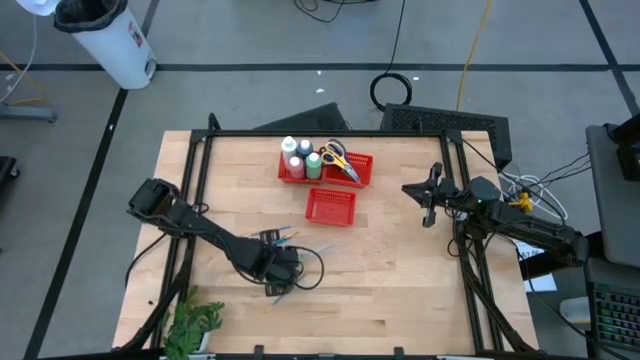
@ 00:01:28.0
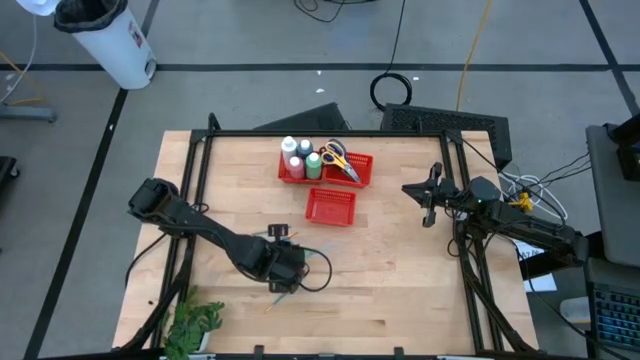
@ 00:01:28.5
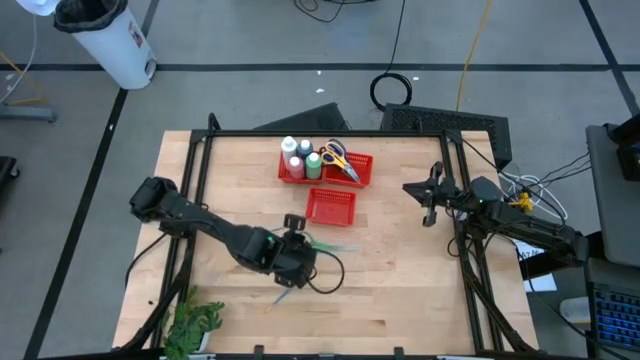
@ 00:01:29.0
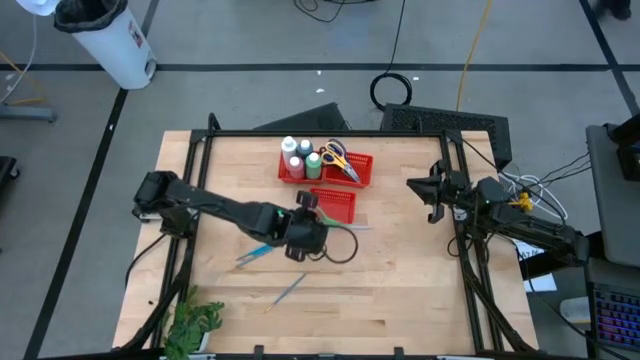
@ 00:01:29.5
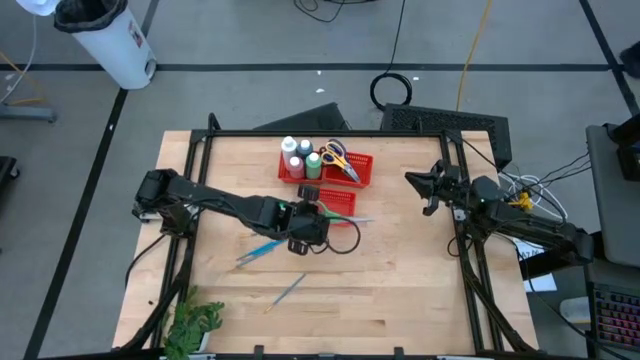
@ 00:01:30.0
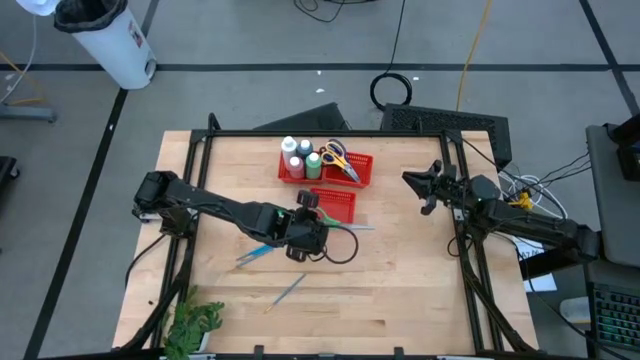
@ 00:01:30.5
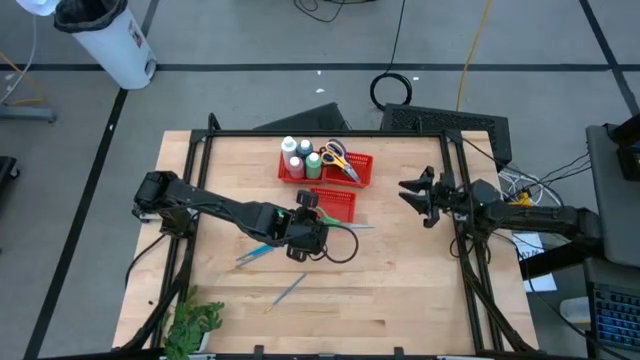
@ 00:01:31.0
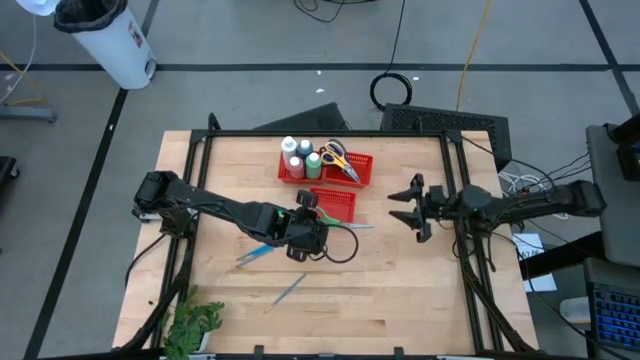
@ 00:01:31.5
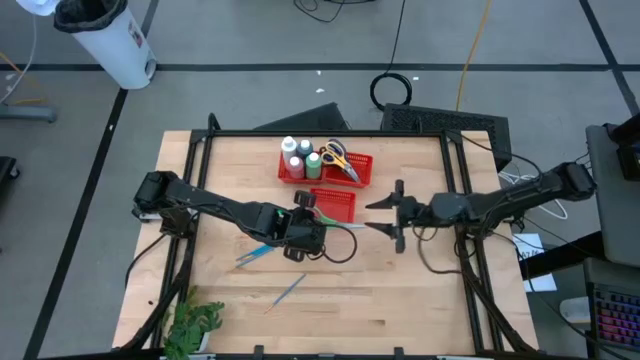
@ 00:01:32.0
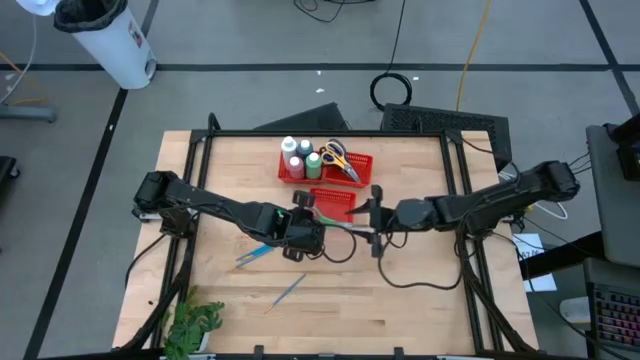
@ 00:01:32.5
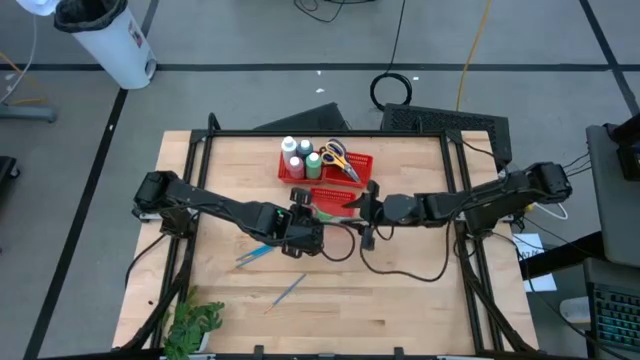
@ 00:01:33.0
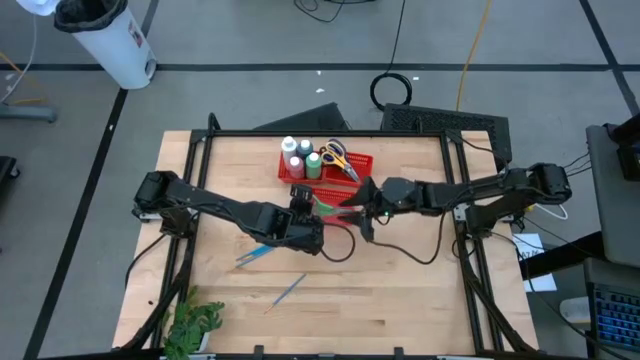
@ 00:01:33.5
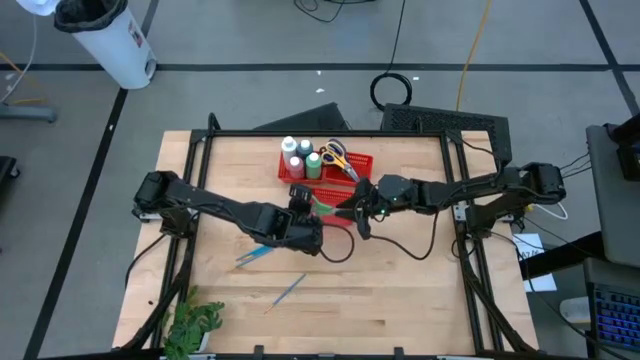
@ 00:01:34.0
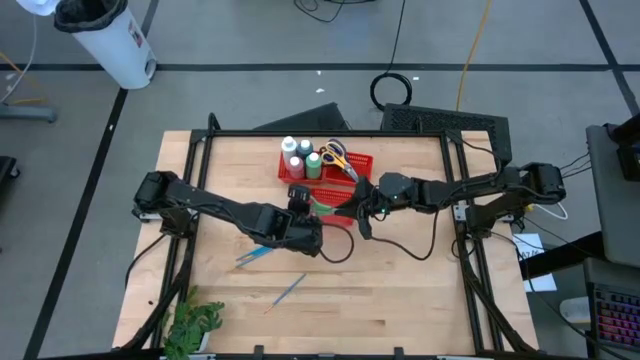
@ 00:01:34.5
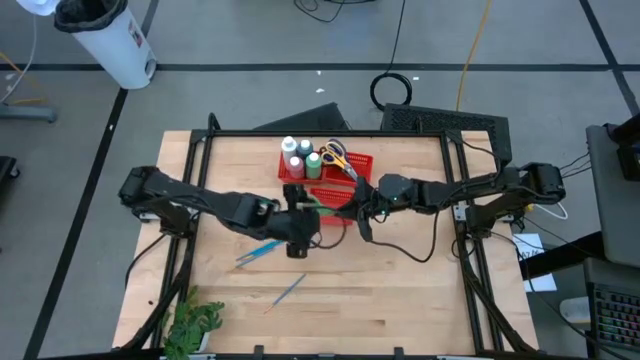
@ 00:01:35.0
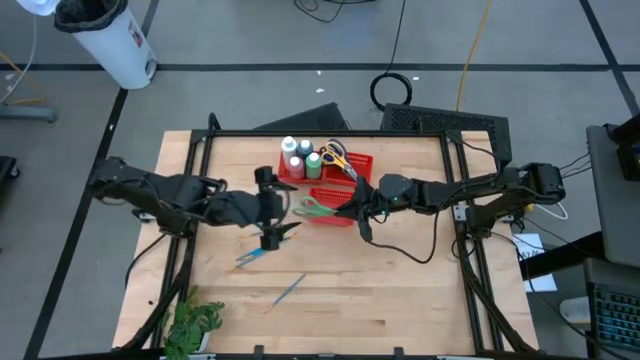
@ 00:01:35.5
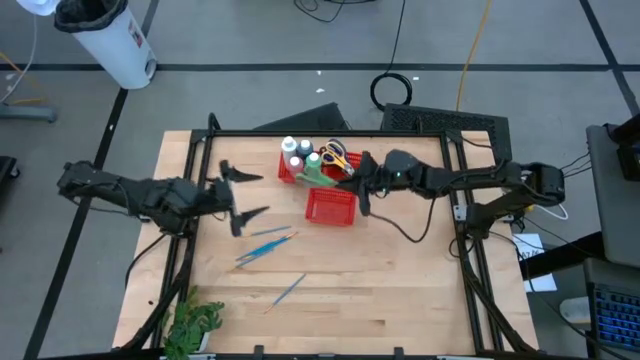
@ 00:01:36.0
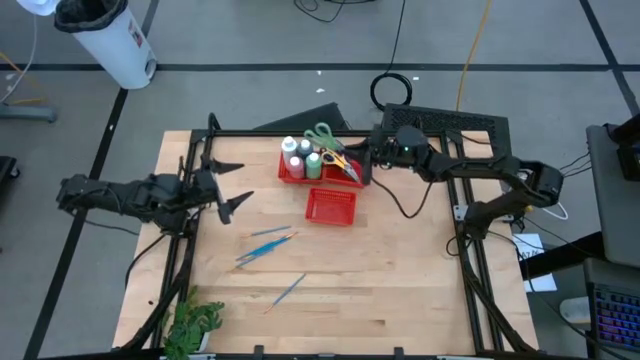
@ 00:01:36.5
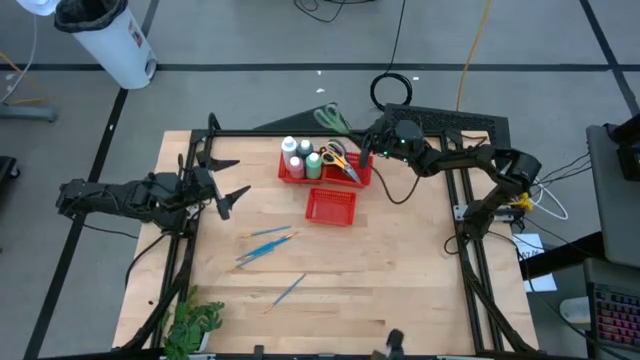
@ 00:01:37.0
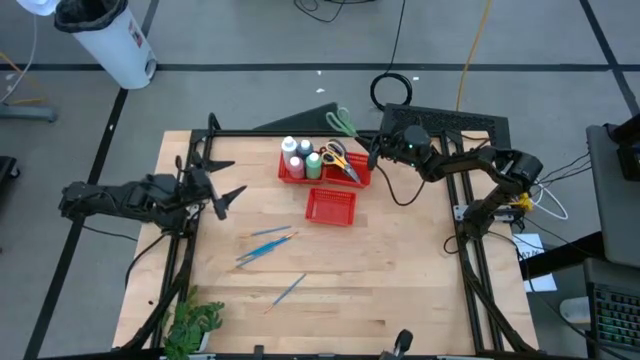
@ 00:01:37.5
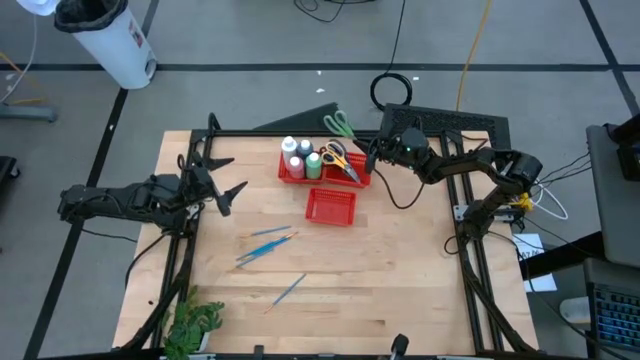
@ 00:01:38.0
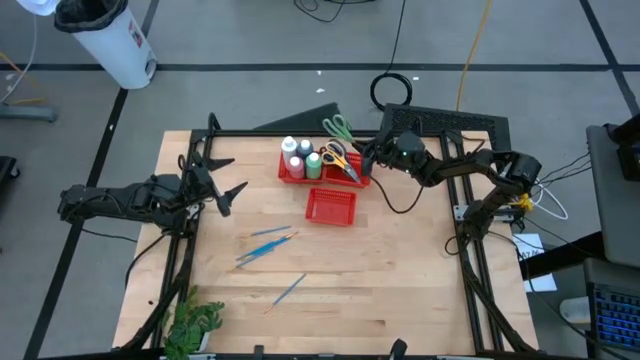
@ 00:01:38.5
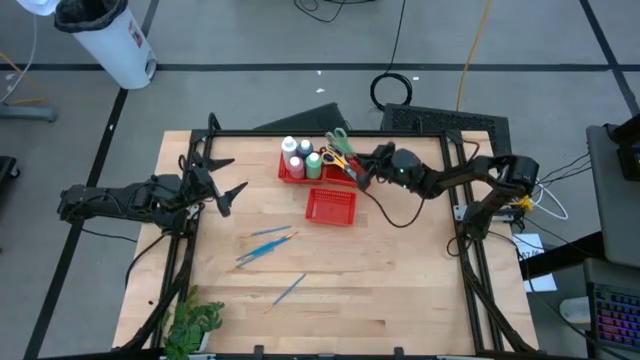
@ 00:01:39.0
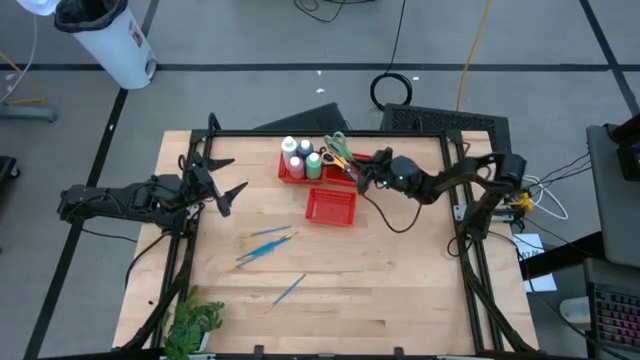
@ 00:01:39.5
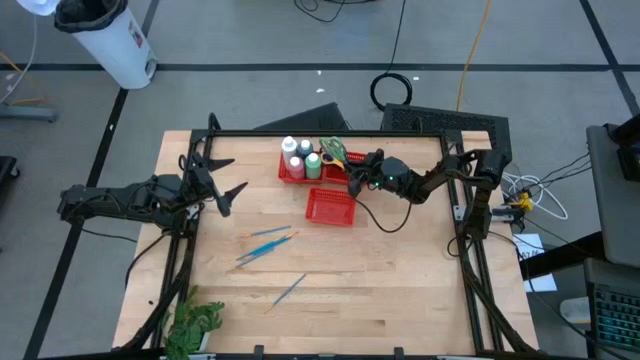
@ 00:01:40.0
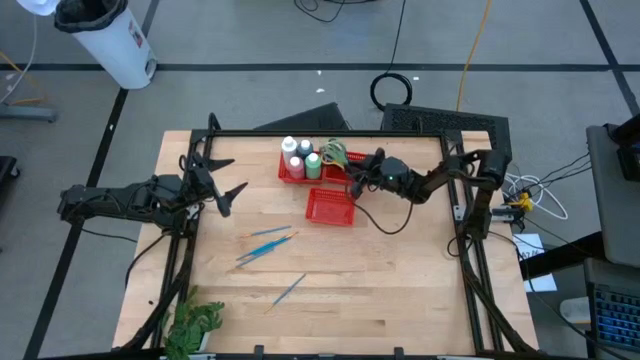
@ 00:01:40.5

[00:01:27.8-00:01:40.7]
Task: Pick & Place Paint Supplies
Put the green scissors into the top right red bin

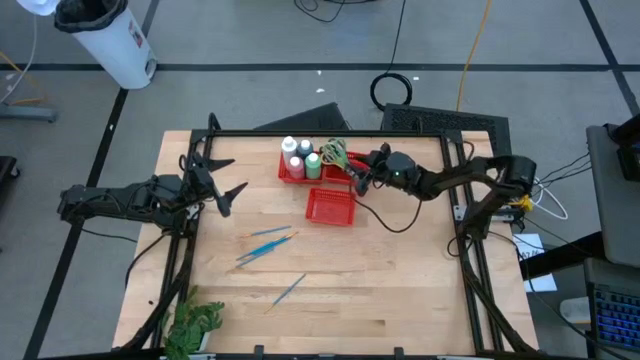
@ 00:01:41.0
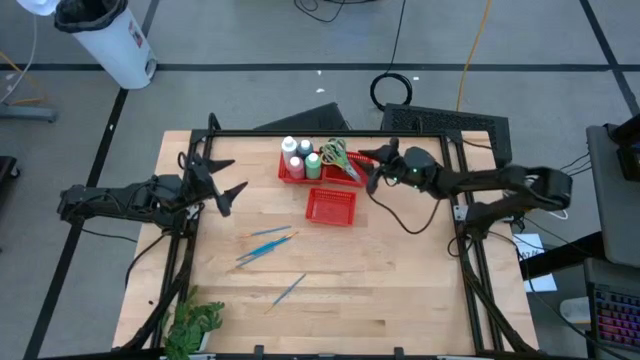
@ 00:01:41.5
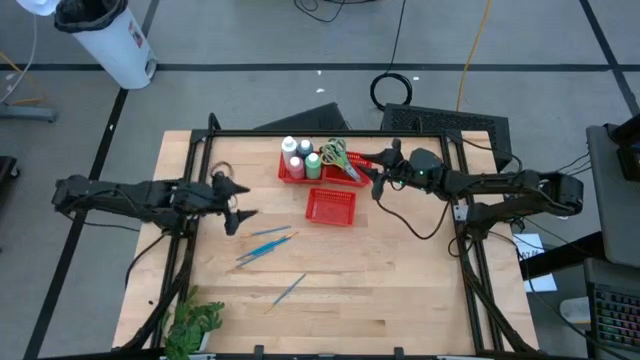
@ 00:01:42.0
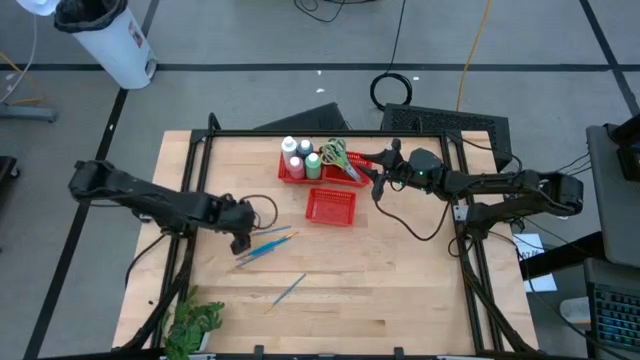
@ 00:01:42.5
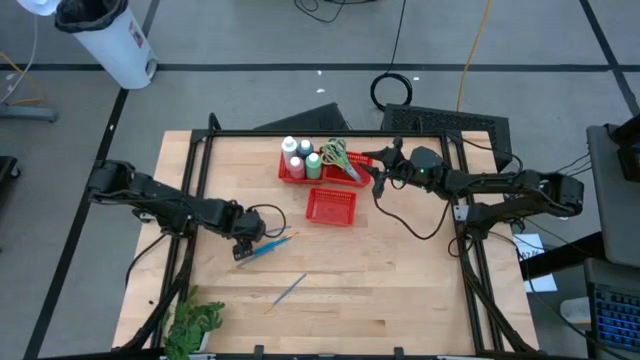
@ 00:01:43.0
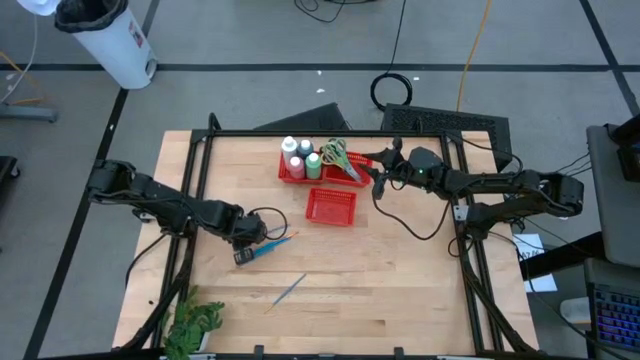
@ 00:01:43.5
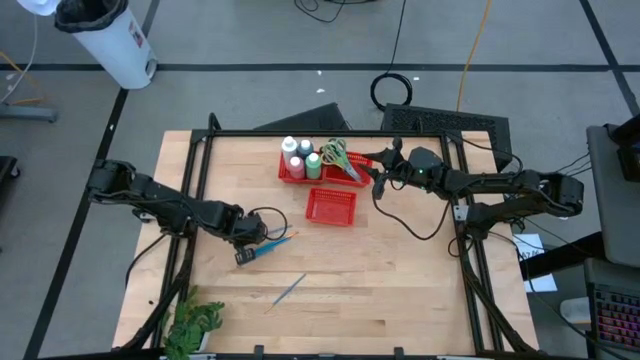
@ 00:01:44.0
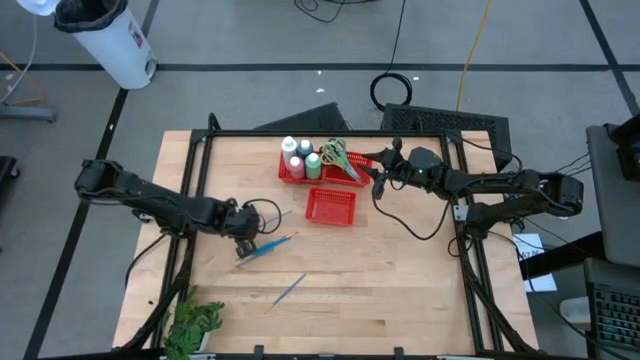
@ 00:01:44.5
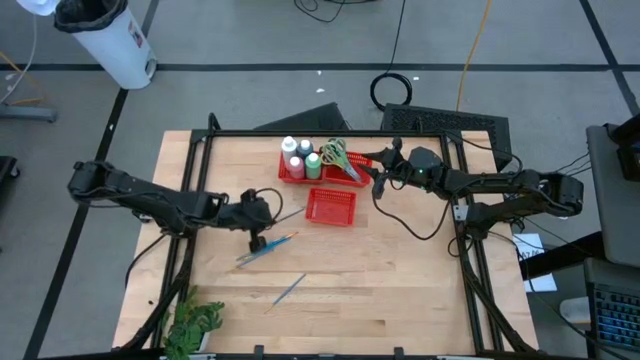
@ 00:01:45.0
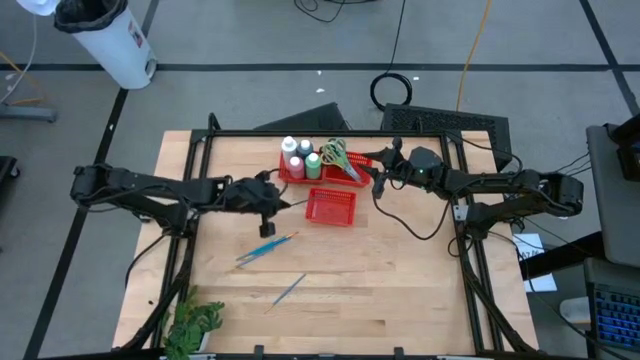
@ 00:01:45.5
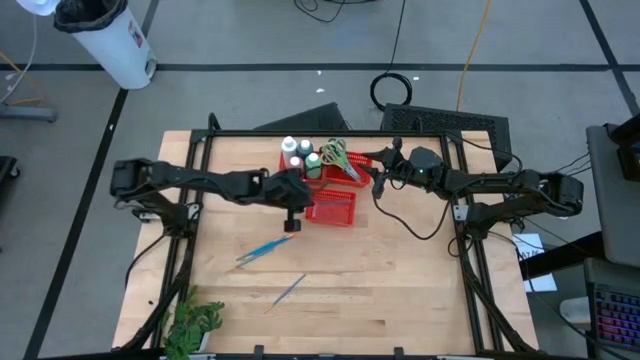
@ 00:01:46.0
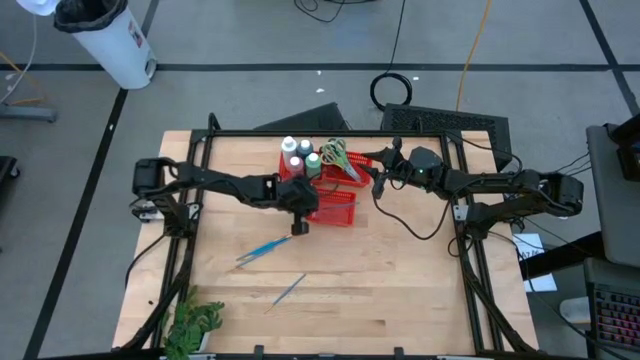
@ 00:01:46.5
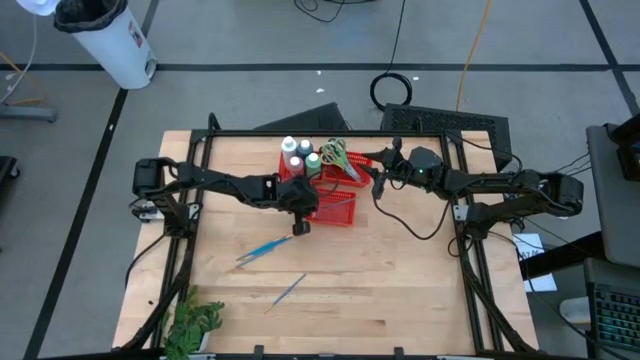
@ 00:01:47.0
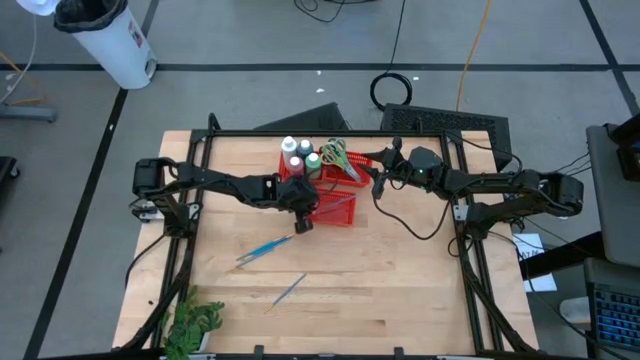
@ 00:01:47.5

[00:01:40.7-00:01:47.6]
Put the blue paint brush into the bottom red bin
